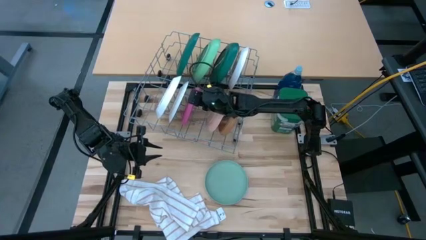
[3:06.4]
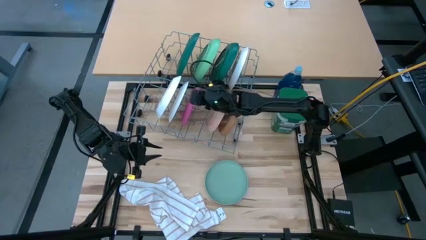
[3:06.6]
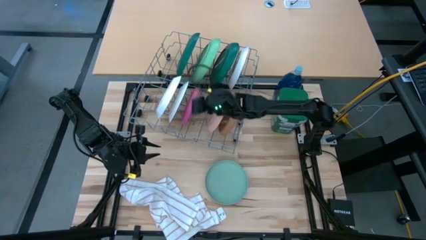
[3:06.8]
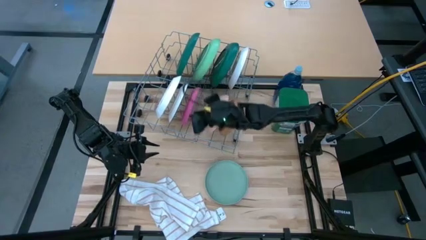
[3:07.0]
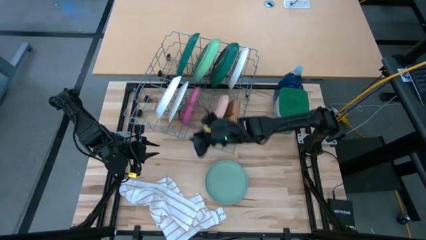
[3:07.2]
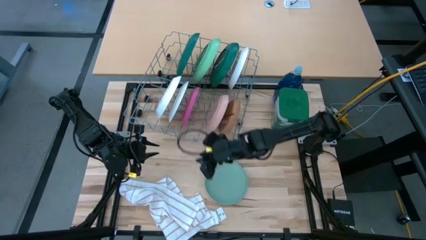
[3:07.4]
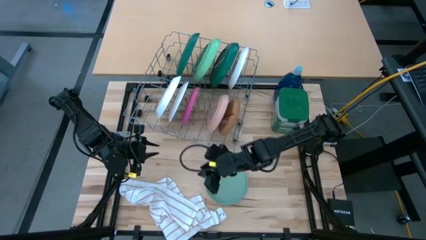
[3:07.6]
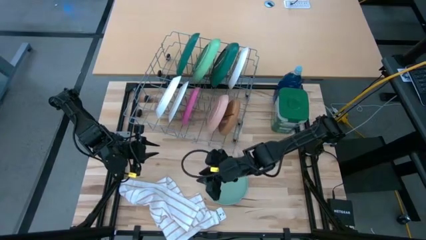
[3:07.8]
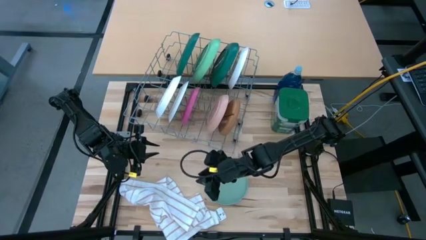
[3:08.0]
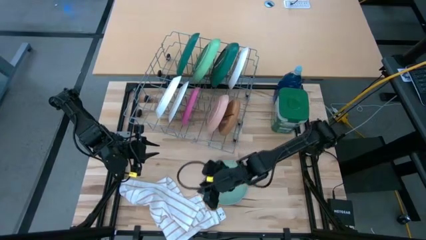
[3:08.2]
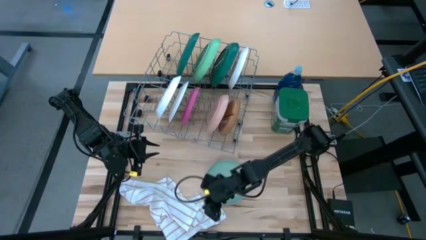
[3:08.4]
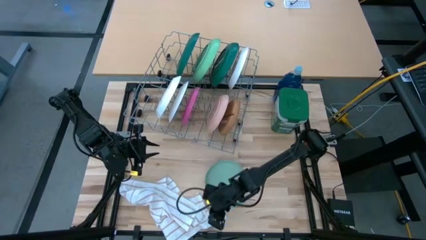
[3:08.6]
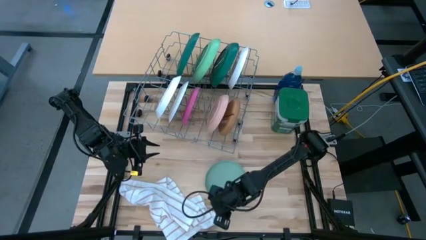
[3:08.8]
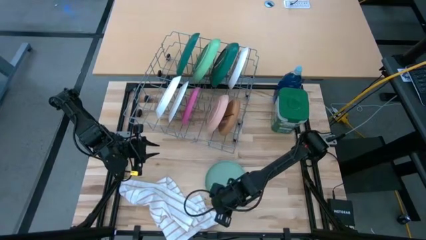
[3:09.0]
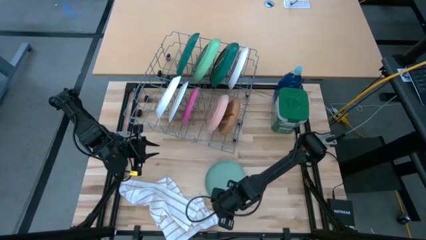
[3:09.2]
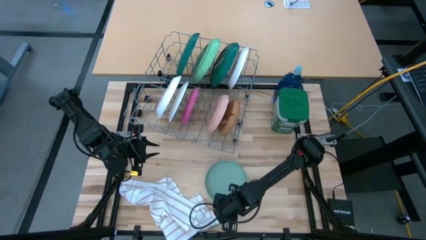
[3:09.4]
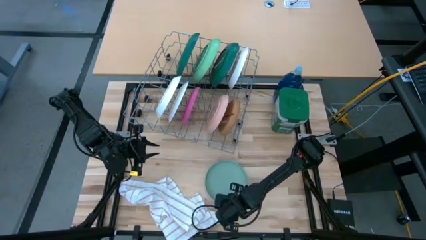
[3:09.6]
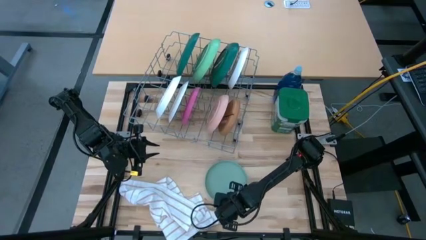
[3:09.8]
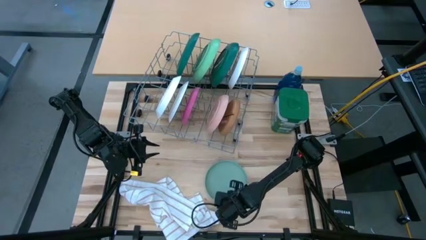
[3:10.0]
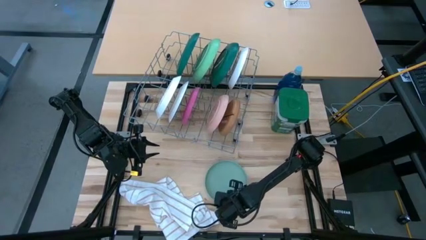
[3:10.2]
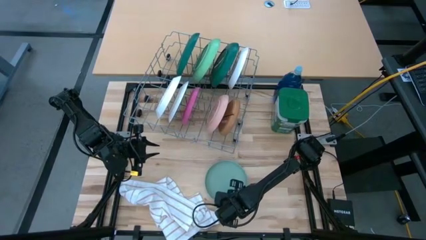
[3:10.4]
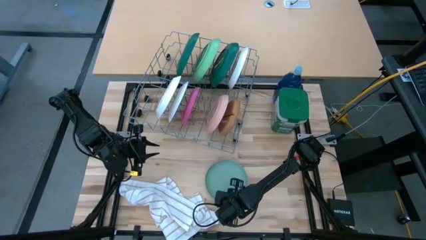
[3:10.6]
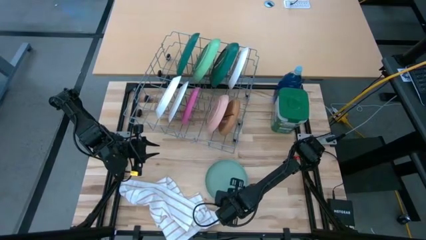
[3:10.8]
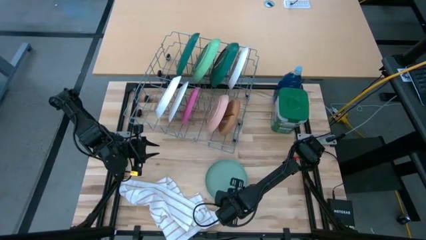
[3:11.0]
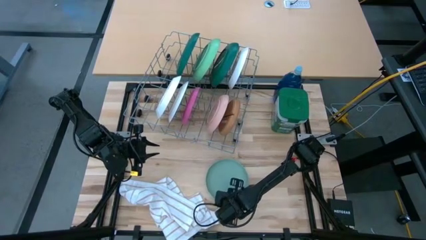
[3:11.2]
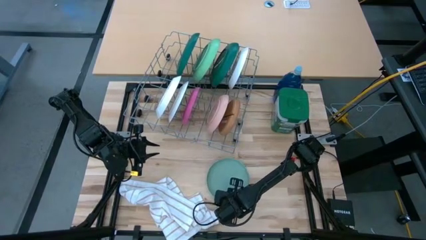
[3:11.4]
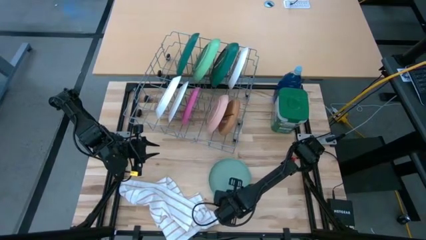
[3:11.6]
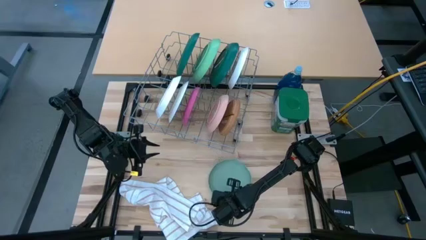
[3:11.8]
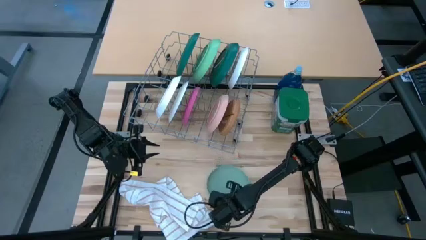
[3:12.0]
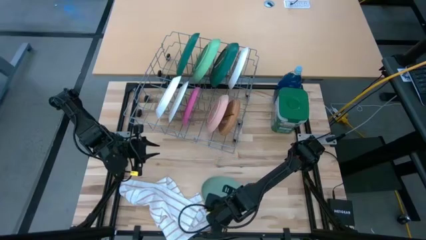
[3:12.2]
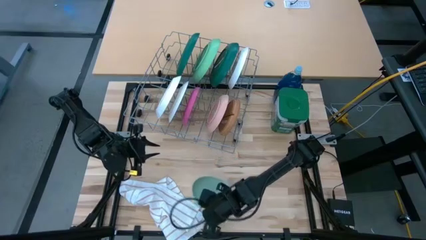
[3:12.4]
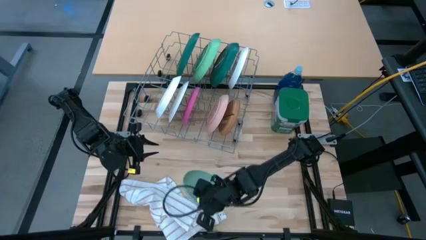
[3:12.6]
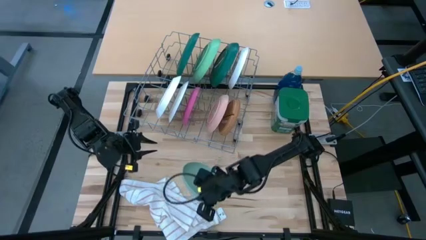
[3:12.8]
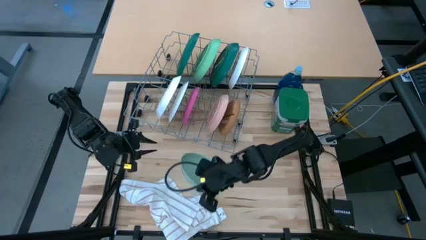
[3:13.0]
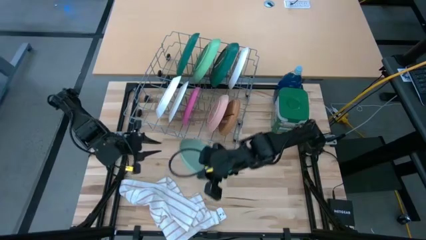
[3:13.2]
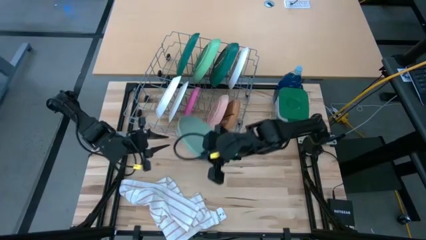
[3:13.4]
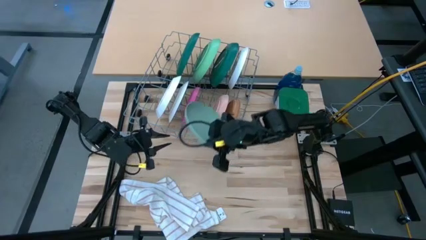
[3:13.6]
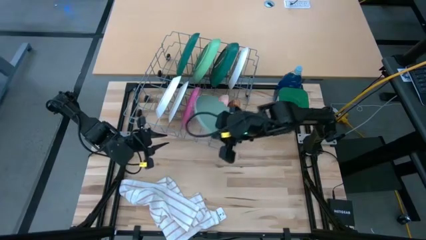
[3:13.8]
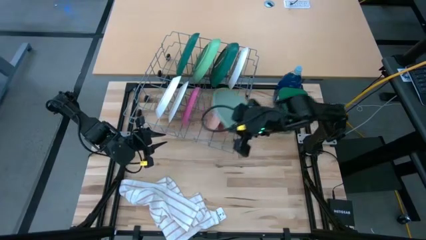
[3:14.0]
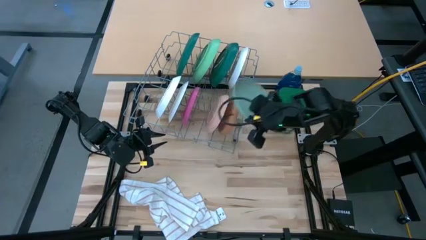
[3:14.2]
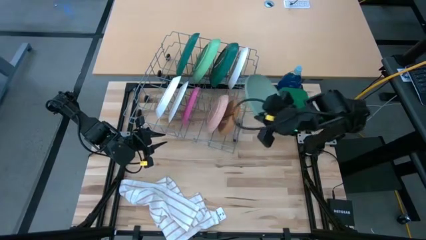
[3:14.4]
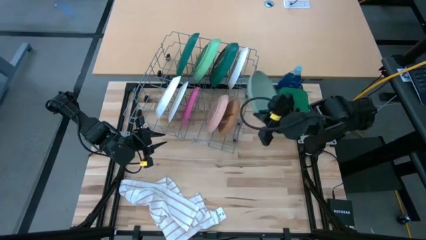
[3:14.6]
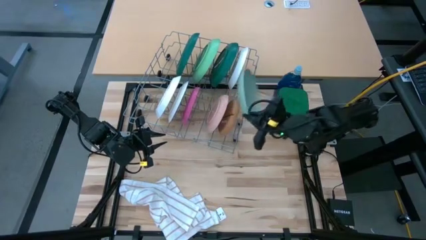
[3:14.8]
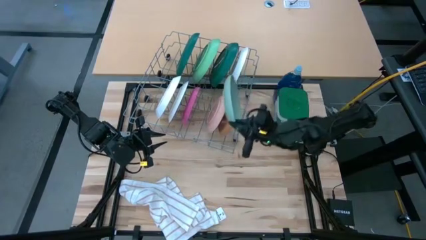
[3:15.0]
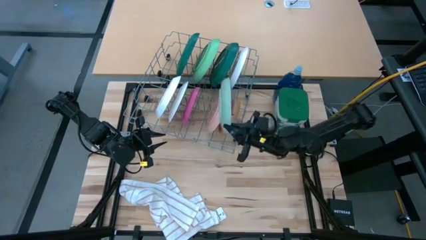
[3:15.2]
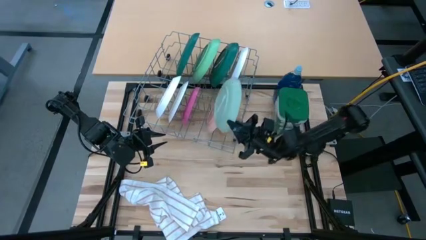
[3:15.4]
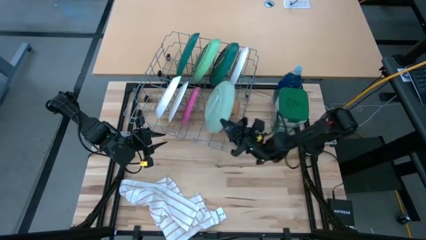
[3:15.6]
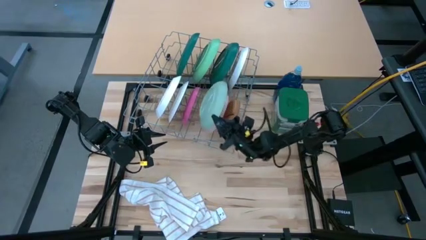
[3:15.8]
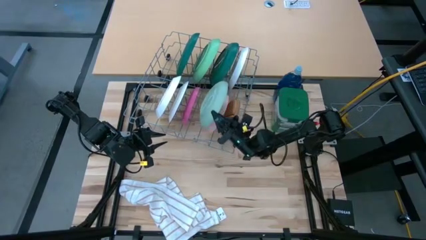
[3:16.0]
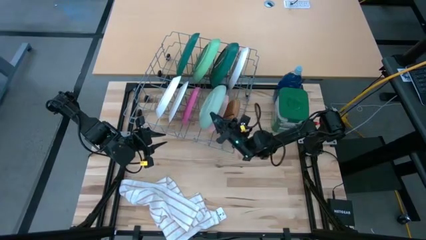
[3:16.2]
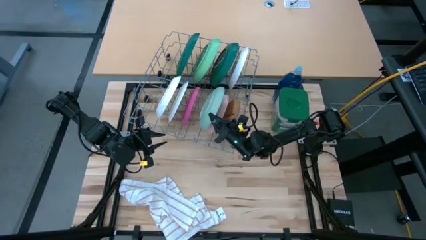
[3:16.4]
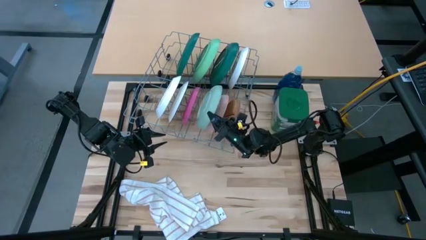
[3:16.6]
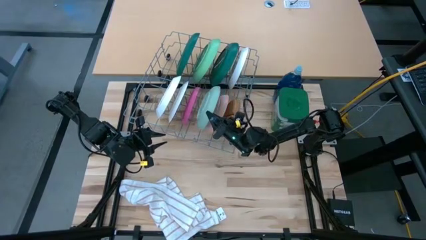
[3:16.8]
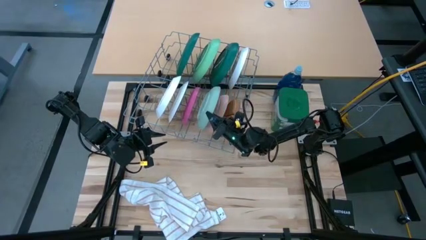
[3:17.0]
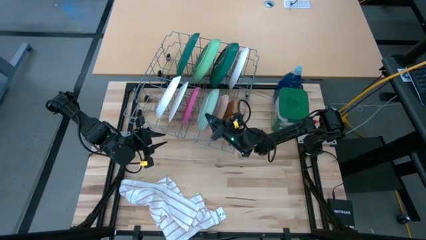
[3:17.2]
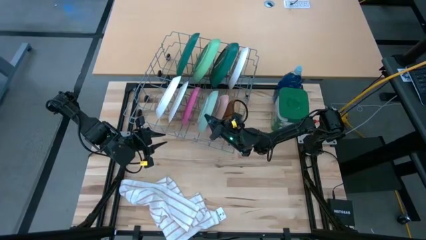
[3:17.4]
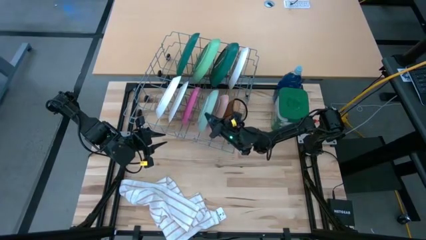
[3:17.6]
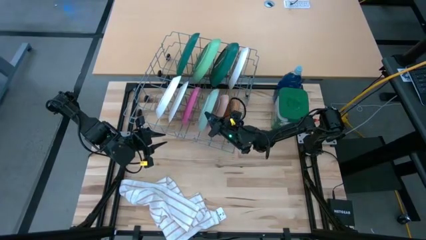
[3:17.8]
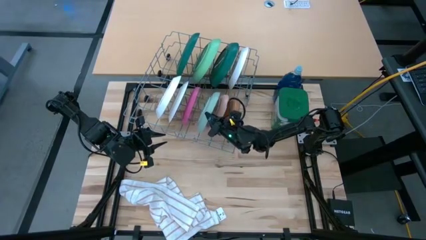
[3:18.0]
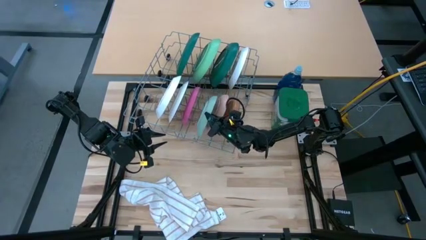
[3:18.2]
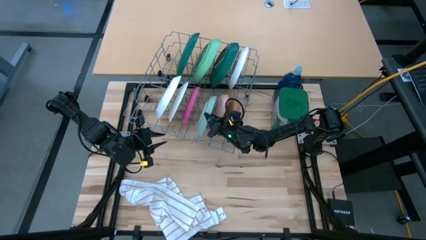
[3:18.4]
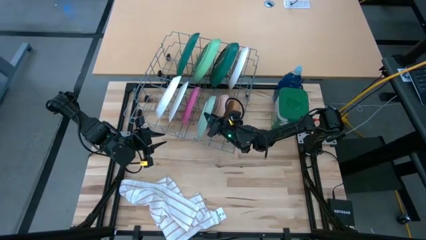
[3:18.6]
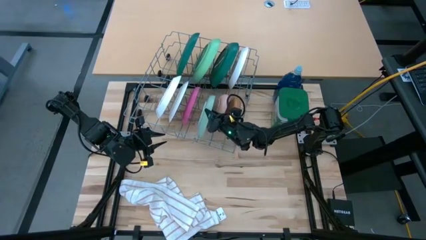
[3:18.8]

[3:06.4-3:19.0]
Task: Sort dishes
Put the light green plate in the dish rack

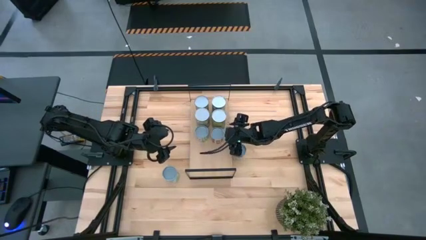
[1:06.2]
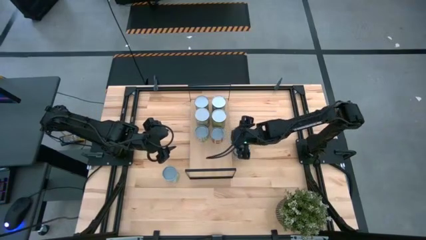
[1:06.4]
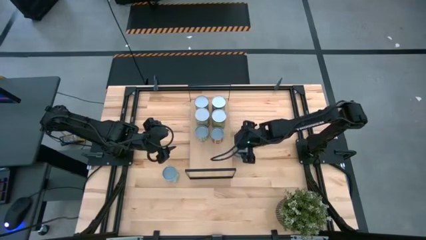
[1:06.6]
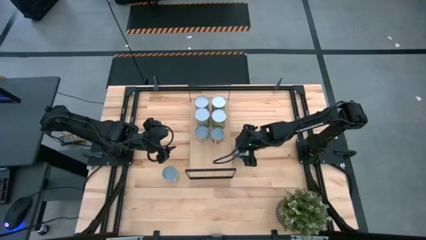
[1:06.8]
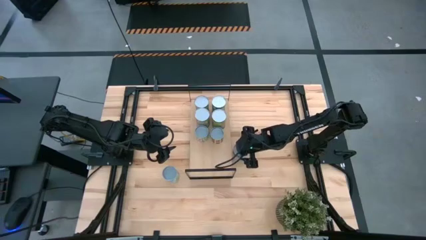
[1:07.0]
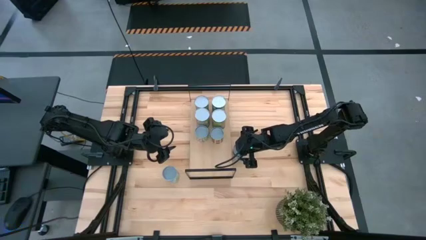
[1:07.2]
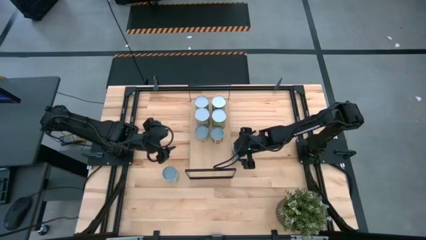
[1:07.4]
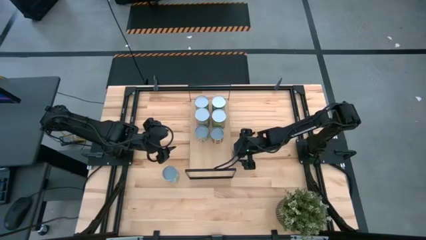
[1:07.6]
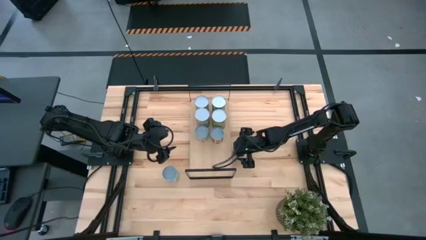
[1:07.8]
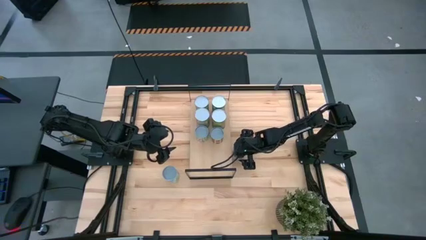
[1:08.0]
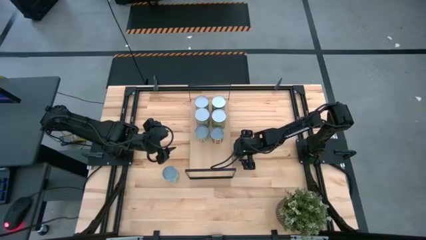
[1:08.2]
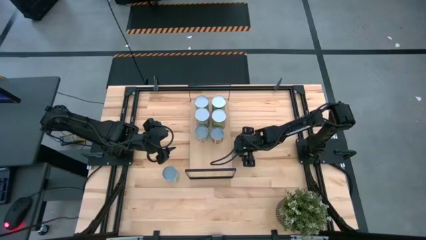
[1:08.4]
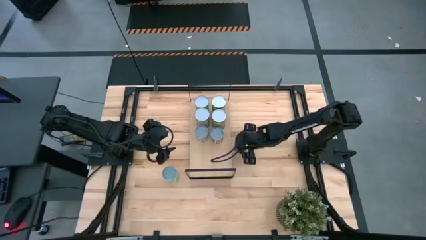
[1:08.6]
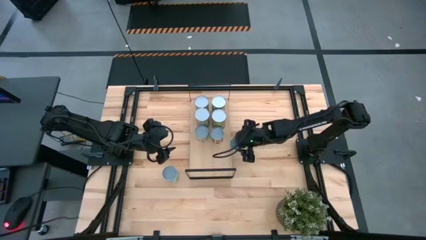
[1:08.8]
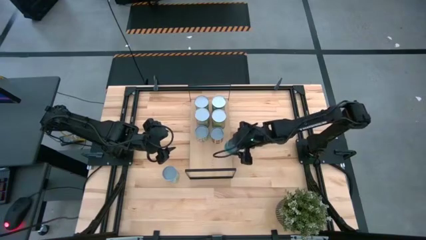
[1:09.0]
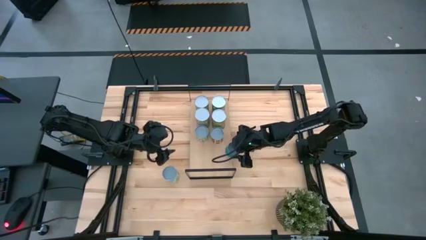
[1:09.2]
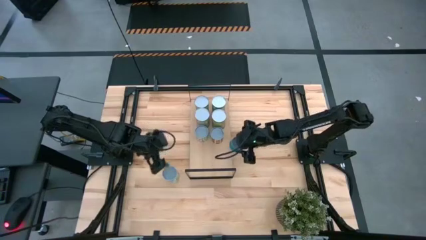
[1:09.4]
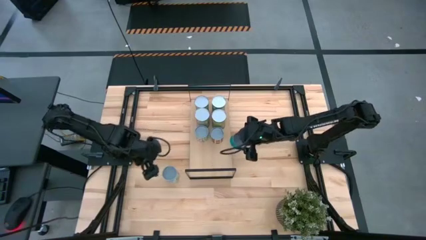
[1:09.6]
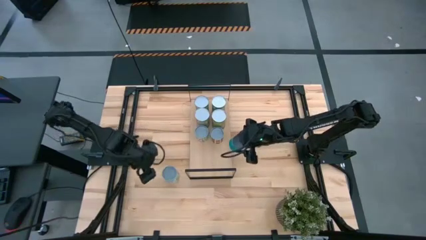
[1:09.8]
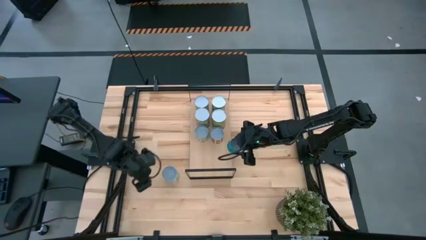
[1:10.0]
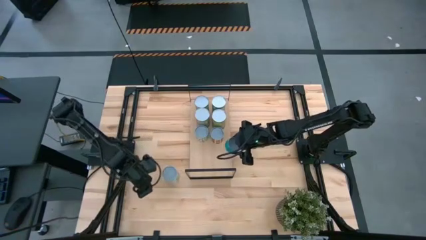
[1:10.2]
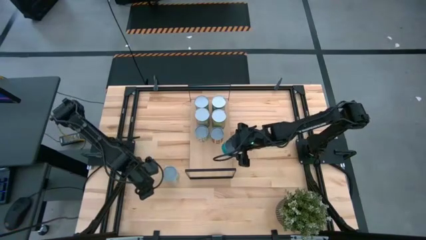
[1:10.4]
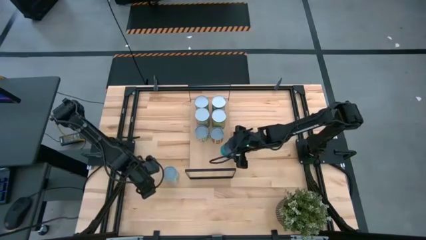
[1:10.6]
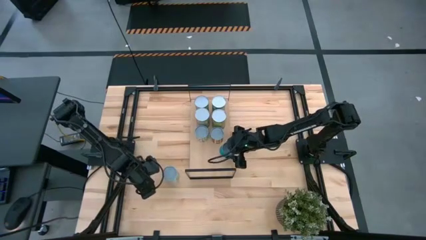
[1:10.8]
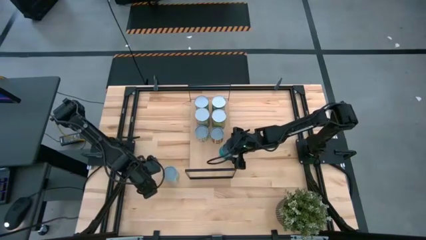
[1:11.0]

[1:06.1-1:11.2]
Task: Pick and place cans onto a shelf
Put the canned tuna onto the shelf

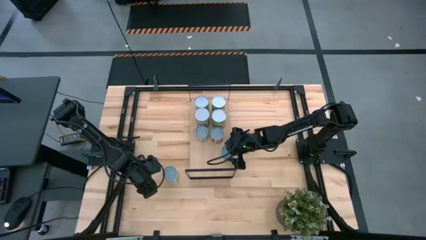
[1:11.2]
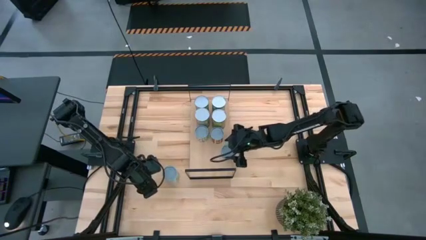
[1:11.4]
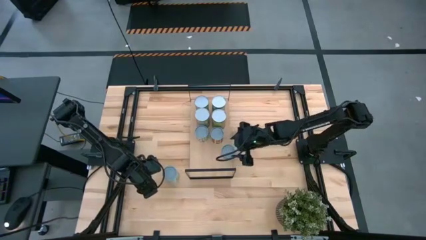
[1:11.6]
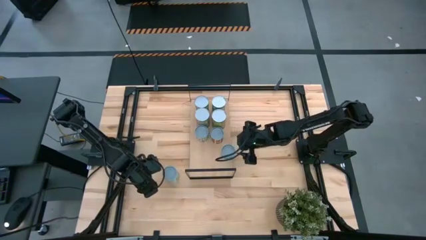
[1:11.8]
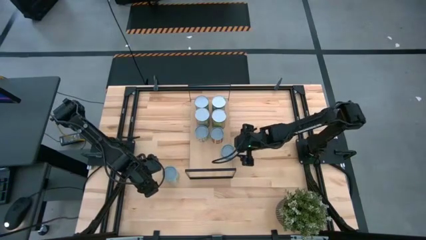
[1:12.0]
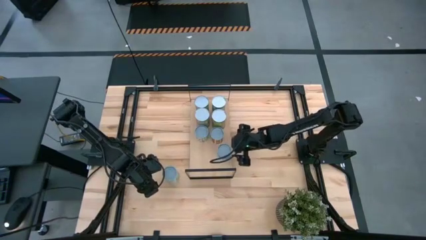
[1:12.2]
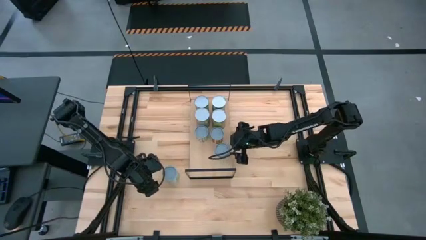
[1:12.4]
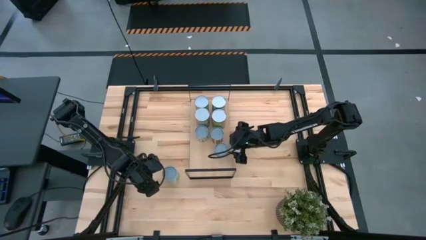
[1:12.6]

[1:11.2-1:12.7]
Adjust the canned mixed vegetables on the shelf
